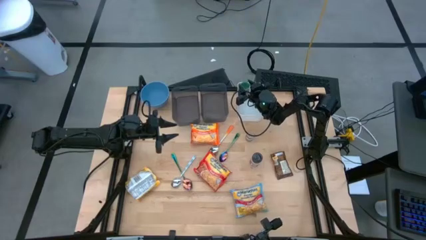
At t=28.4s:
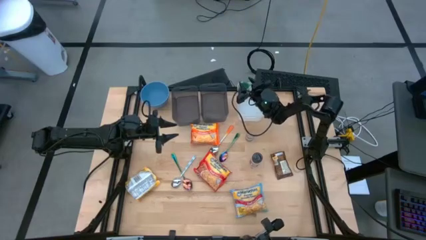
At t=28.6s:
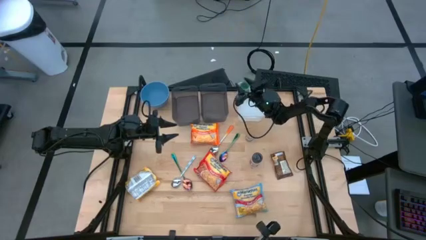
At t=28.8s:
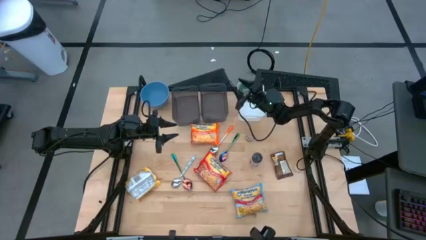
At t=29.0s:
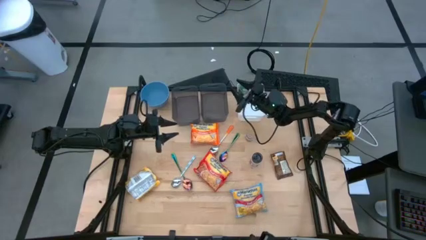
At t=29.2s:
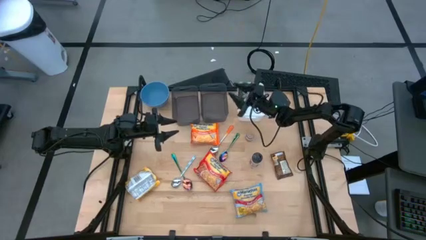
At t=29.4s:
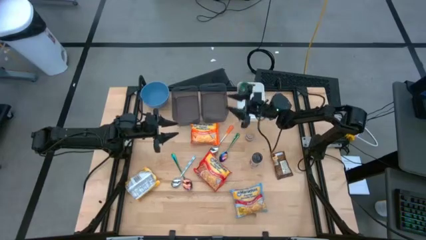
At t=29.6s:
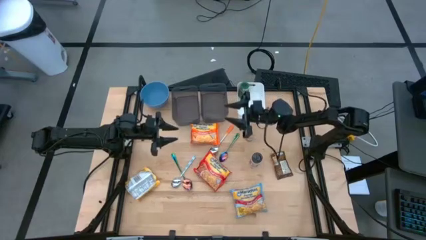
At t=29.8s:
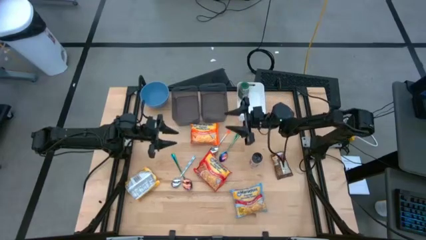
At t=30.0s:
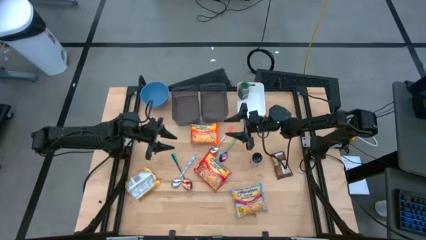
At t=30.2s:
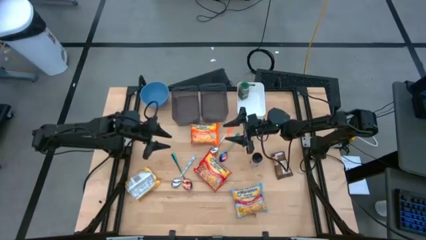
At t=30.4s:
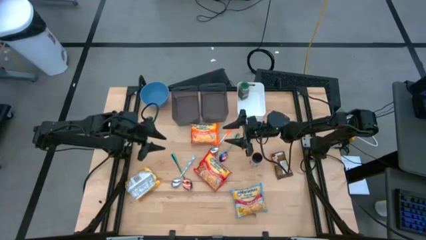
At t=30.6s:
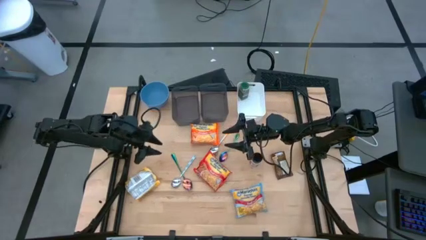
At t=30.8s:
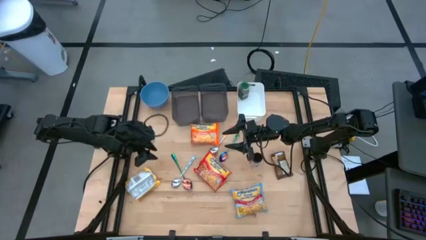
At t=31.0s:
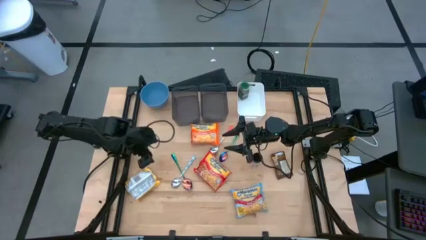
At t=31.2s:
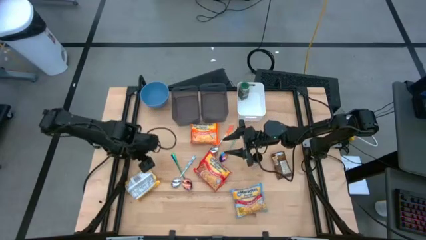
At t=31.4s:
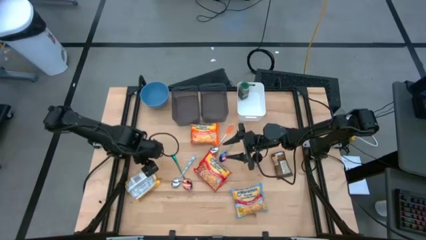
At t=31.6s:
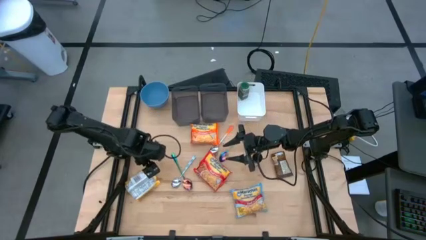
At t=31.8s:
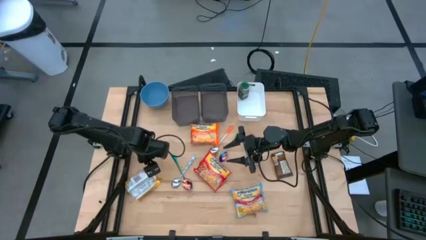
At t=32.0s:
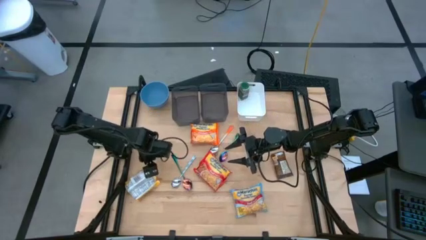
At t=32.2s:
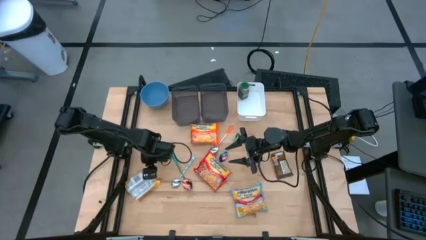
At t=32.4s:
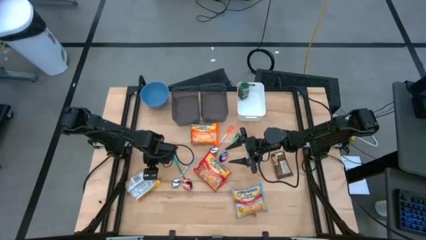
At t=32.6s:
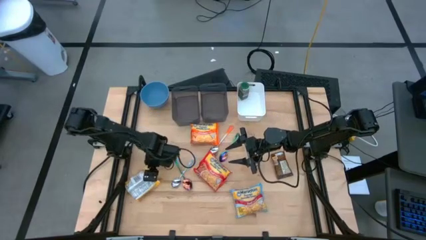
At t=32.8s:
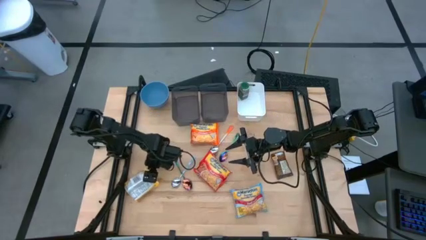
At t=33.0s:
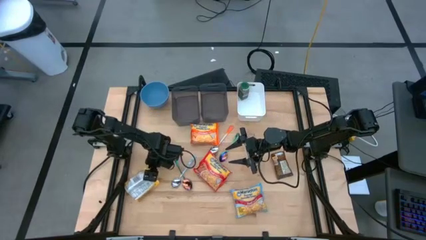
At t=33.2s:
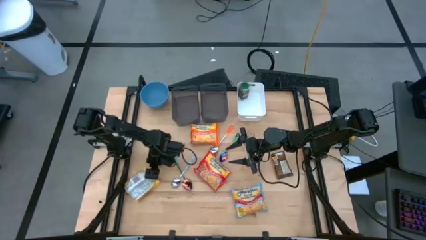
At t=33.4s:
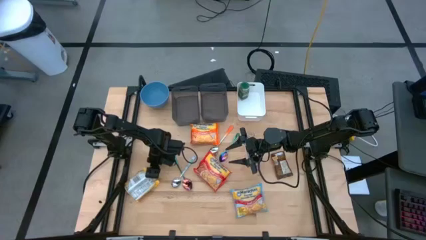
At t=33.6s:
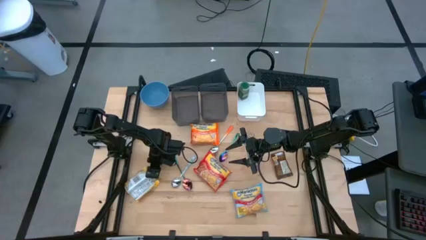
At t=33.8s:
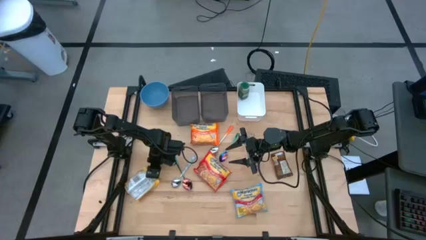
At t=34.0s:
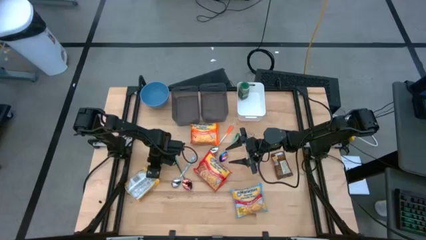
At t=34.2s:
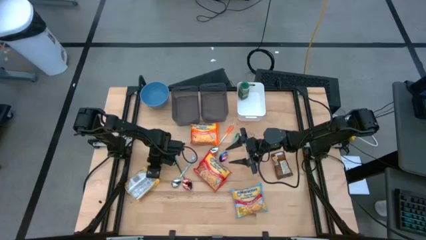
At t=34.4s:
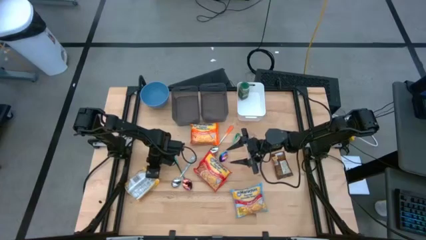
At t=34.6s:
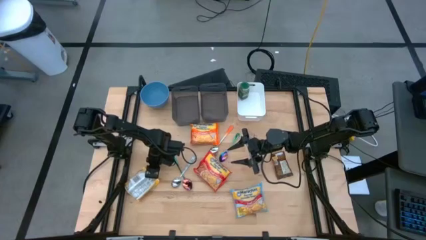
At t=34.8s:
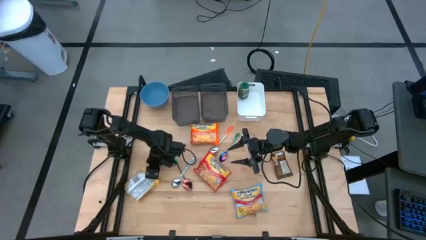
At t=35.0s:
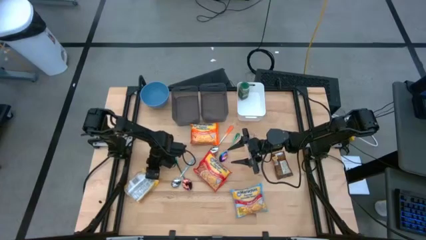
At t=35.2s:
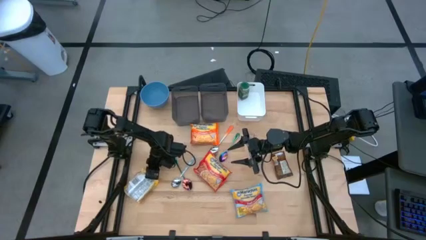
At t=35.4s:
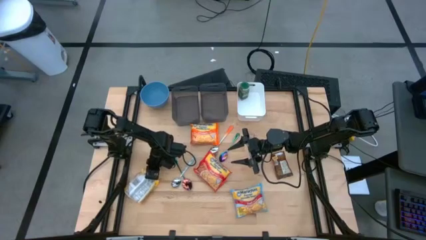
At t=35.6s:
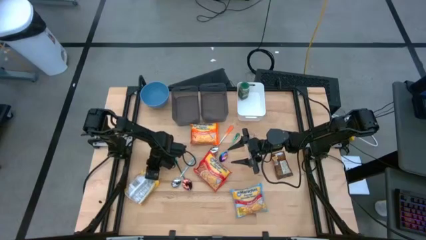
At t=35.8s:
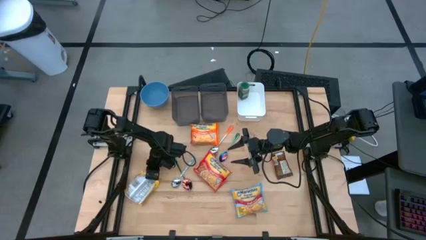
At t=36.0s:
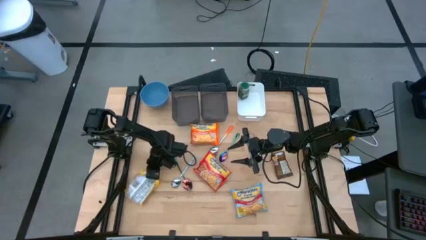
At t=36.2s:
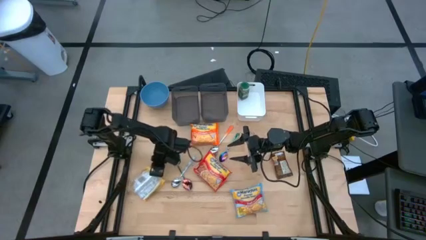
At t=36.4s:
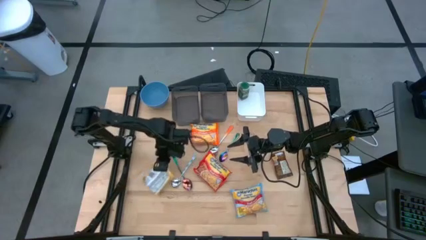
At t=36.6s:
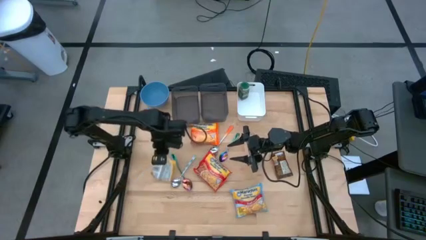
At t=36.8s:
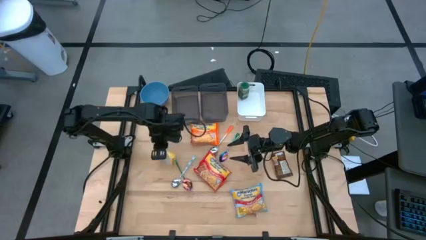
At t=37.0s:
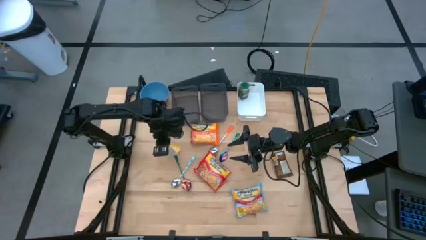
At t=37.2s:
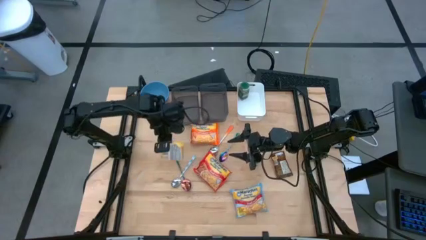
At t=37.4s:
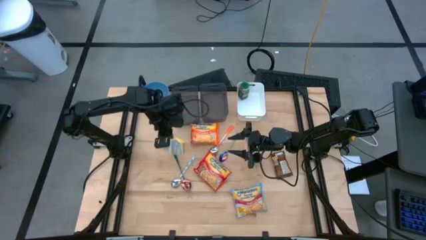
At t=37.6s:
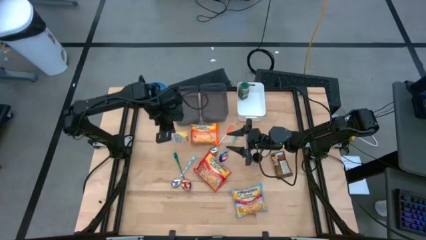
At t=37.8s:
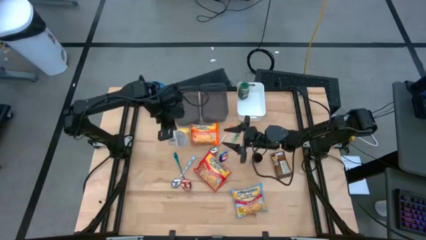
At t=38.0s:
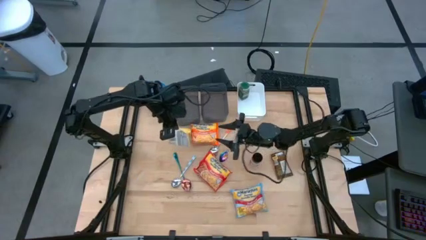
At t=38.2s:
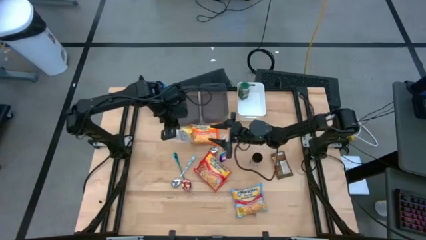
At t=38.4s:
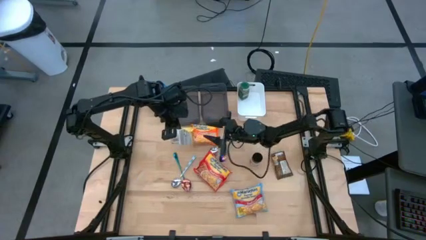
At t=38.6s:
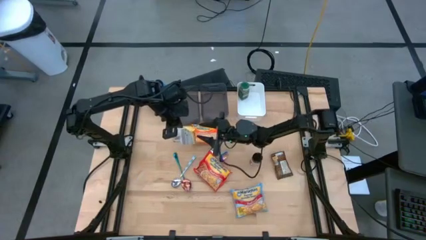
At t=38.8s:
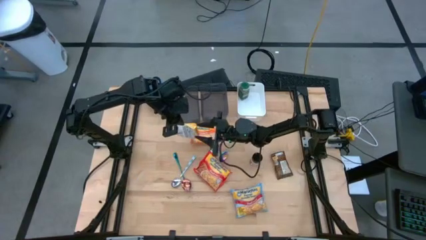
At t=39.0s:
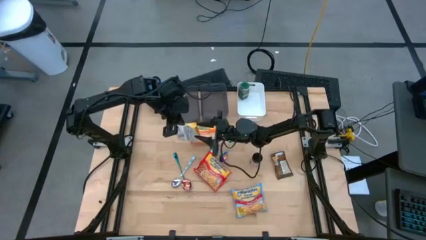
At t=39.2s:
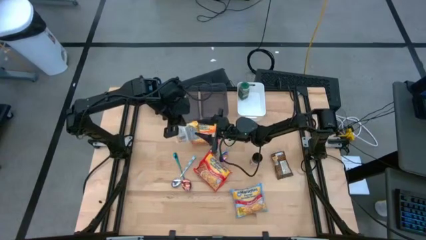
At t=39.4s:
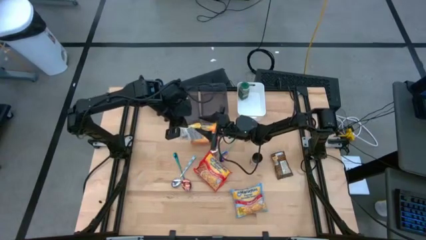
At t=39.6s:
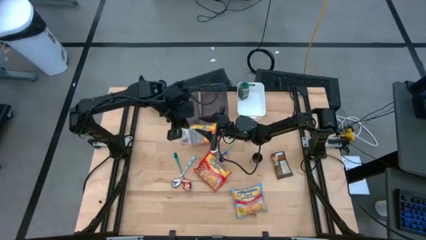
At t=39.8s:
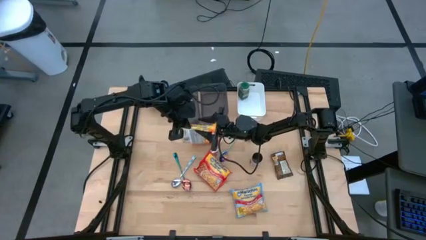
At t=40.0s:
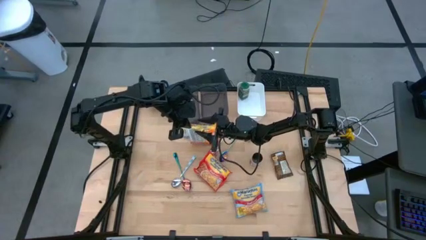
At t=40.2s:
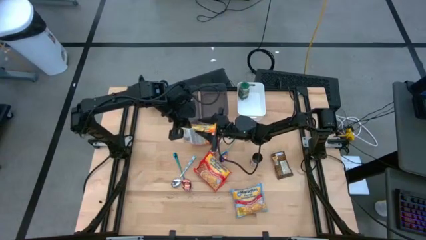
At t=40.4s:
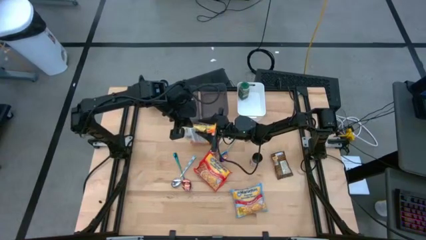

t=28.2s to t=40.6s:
Task: Pick & Place Food Item
Put the yellow noodle pack into the right black bin
